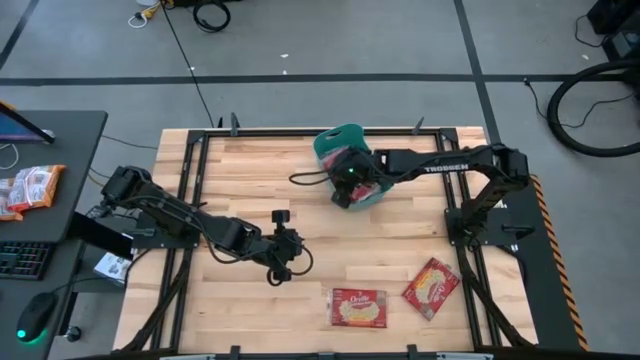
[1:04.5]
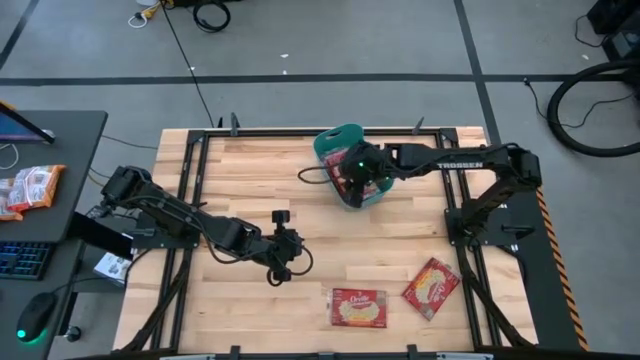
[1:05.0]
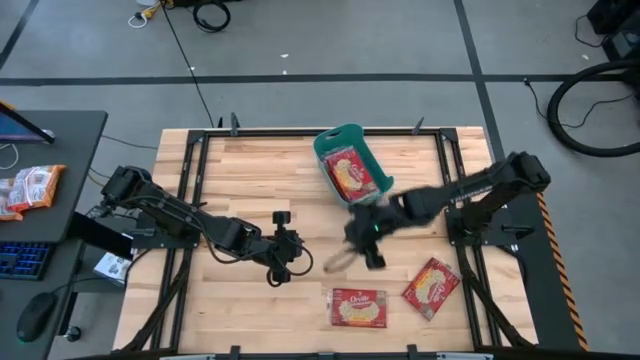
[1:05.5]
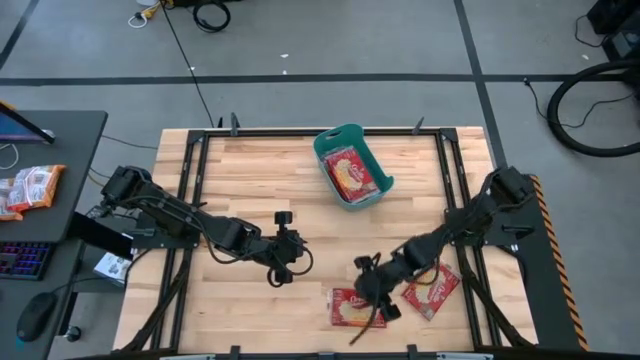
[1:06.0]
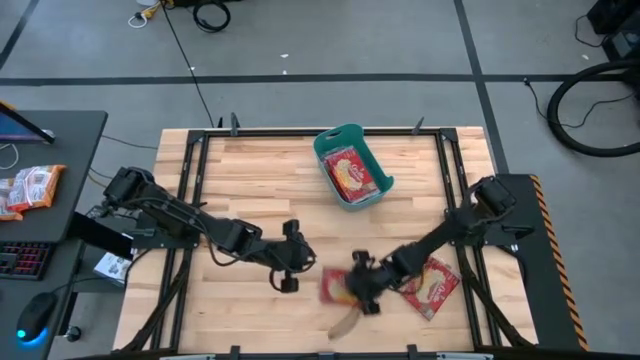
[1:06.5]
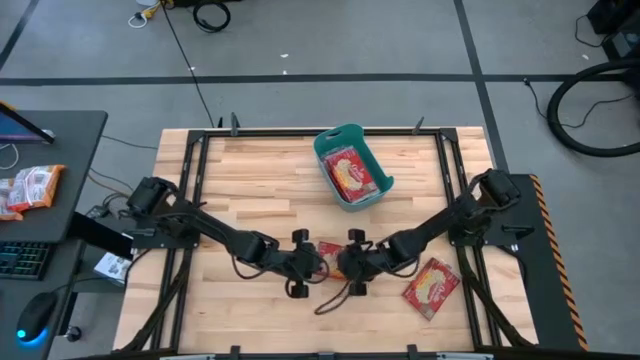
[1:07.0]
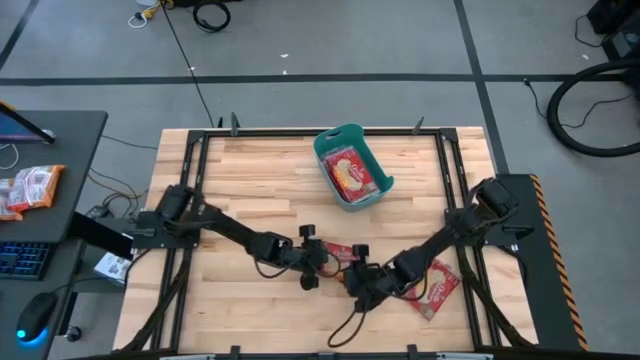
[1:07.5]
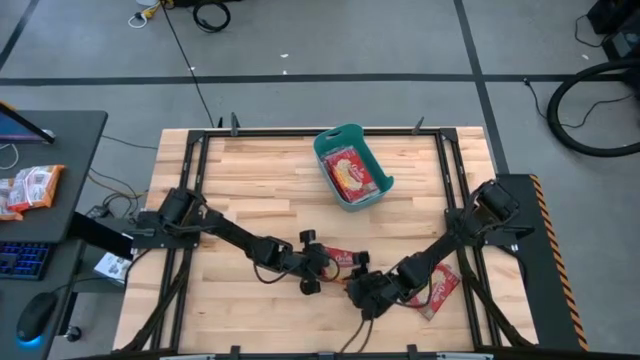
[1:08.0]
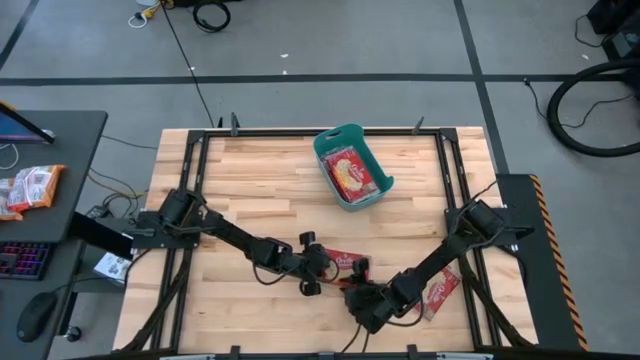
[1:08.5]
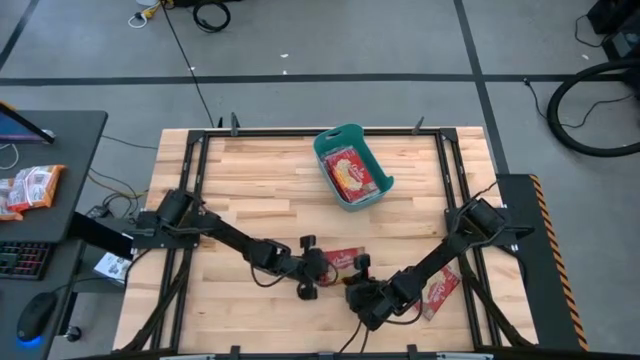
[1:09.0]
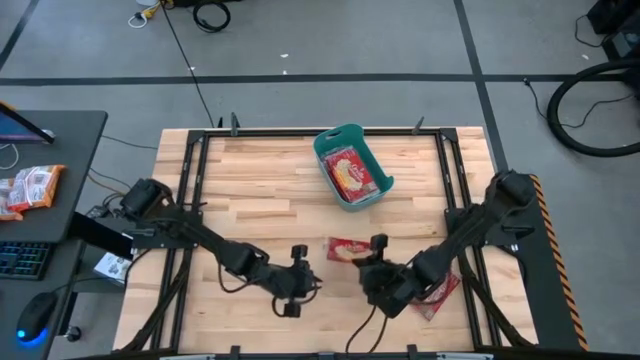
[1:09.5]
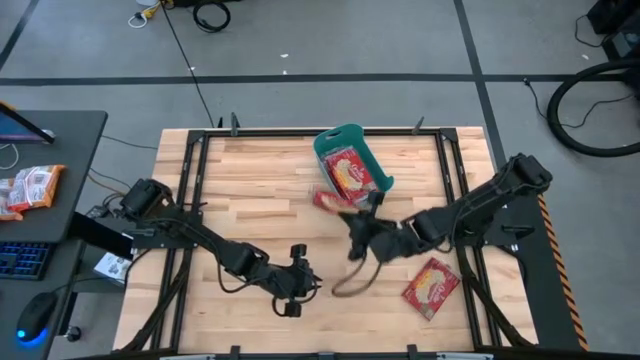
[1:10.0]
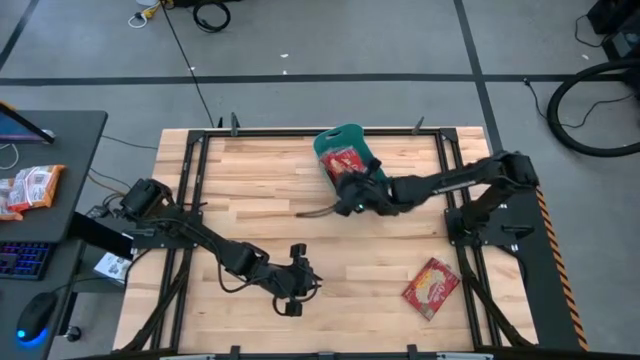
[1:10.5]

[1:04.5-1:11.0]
Task: Sort popcorn bags into baskets
Put the red popcorn bag into the green bin

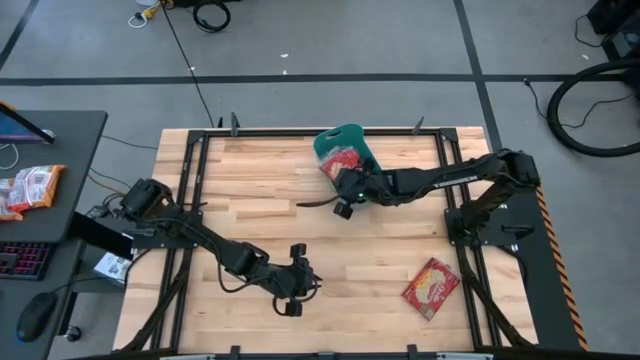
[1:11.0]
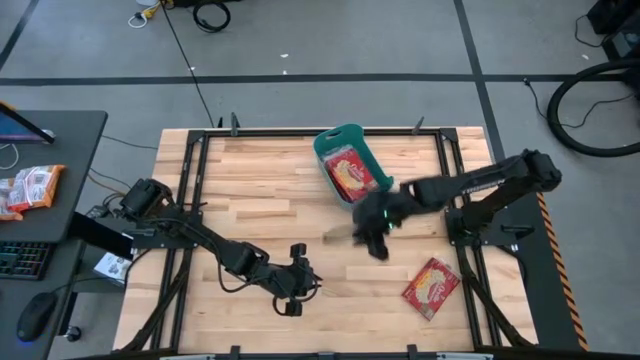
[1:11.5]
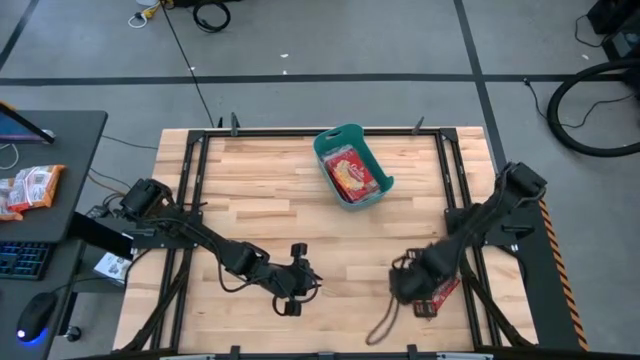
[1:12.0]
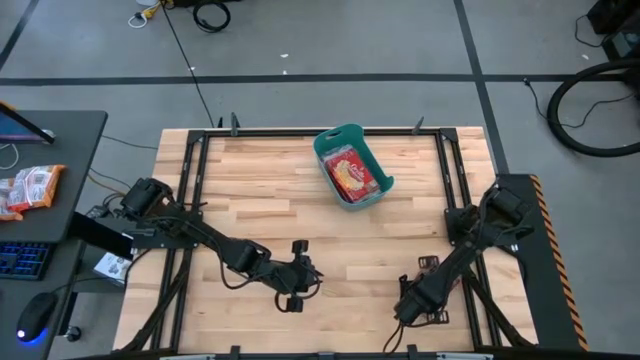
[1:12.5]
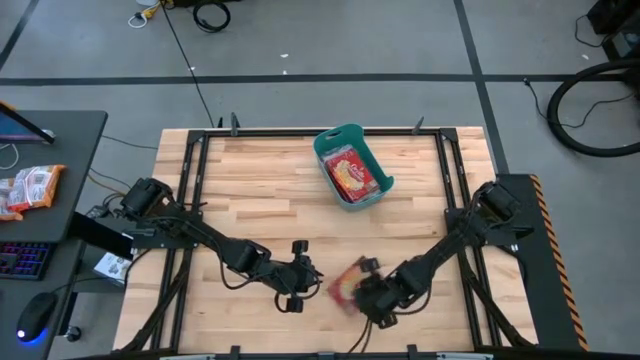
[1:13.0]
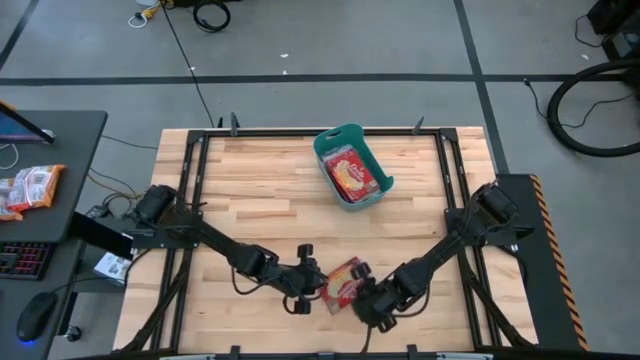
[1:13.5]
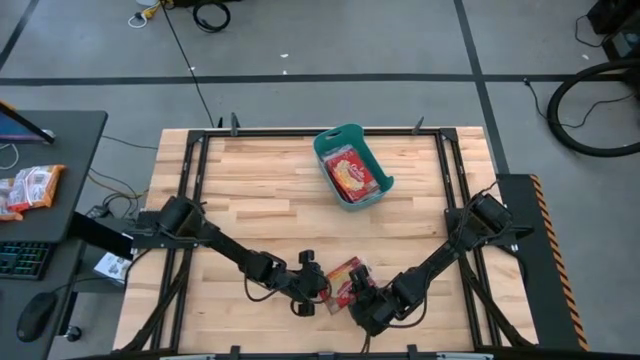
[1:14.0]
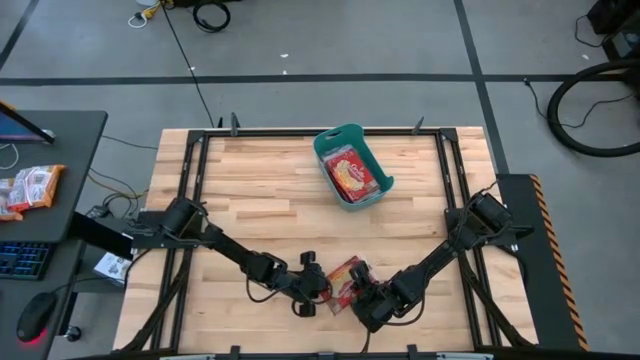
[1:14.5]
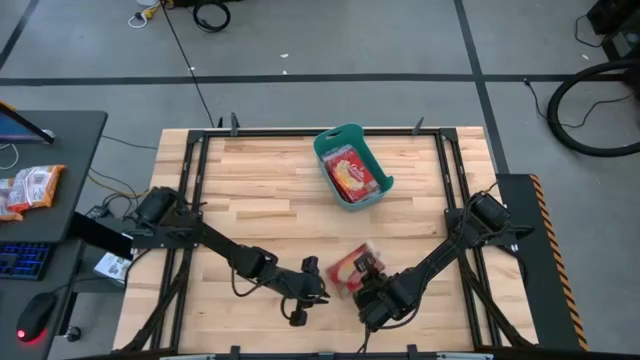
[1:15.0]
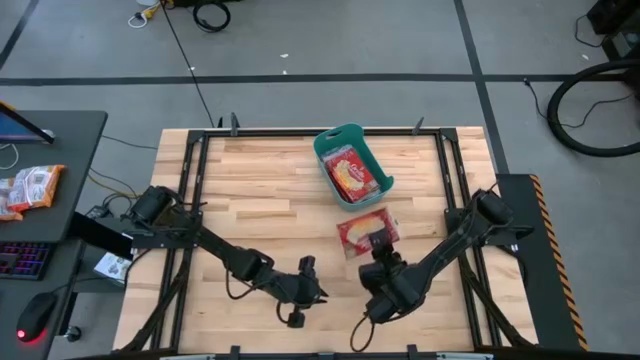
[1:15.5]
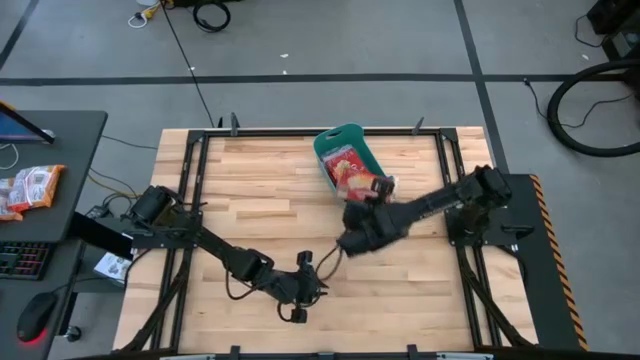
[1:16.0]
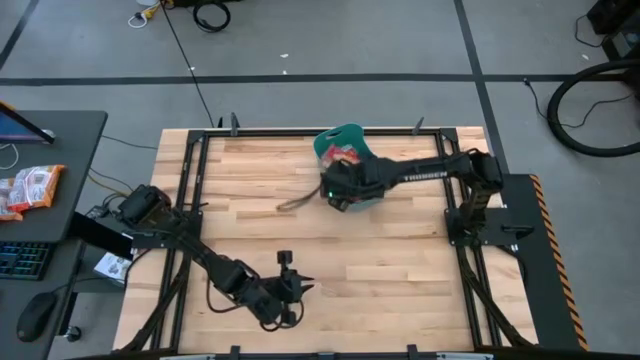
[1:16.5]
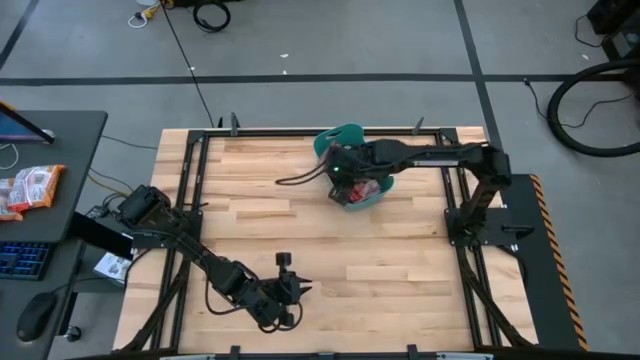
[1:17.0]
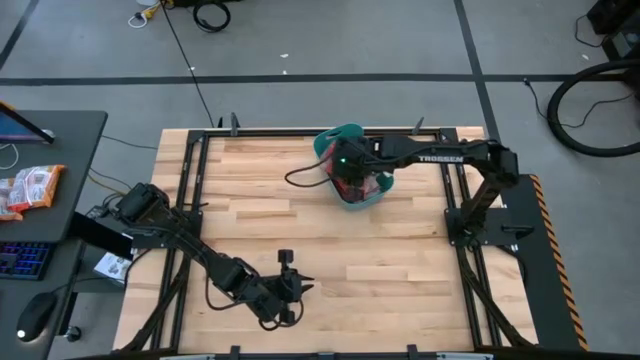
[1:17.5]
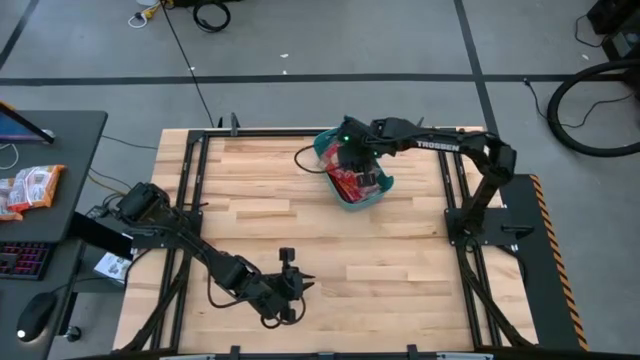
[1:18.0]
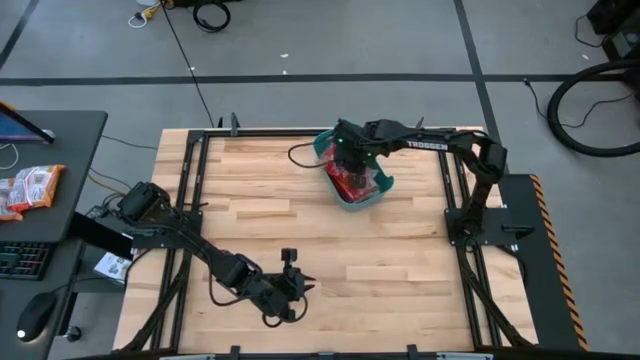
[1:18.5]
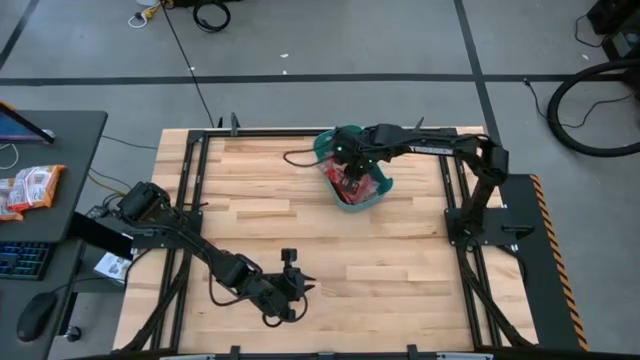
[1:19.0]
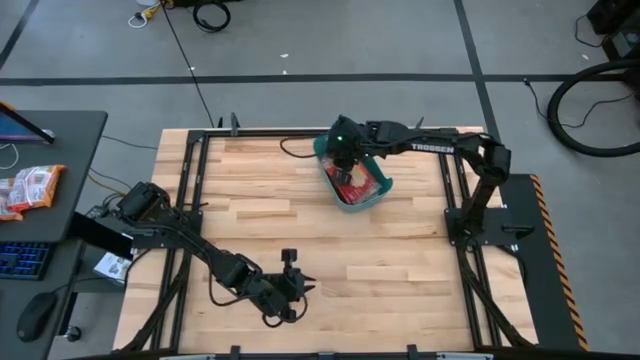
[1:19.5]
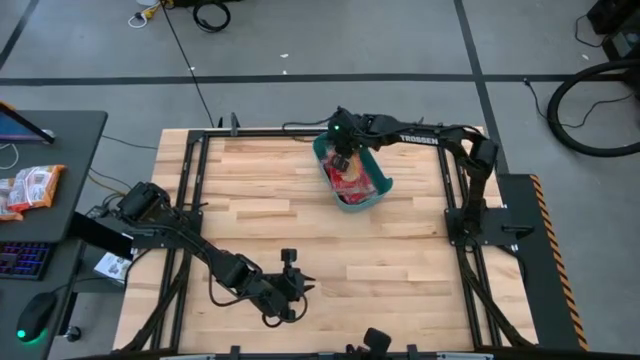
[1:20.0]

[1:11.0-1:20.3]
Put the red popcorn bag into the green bin

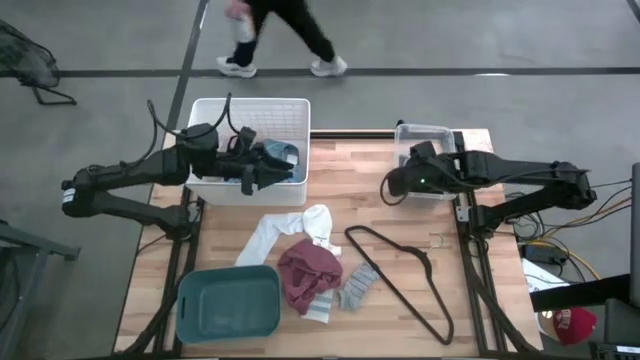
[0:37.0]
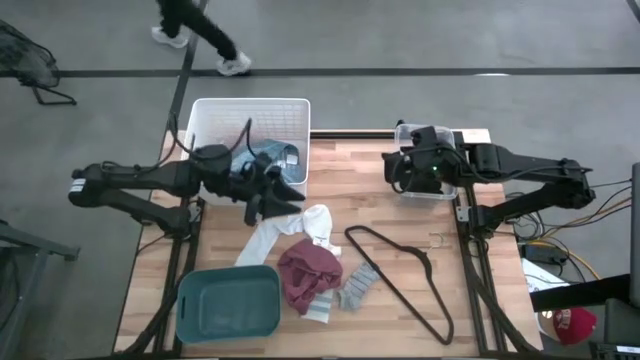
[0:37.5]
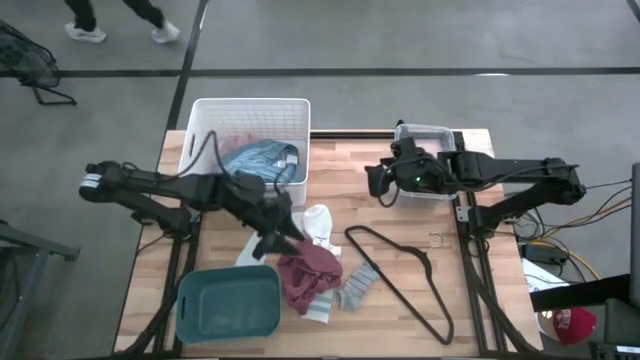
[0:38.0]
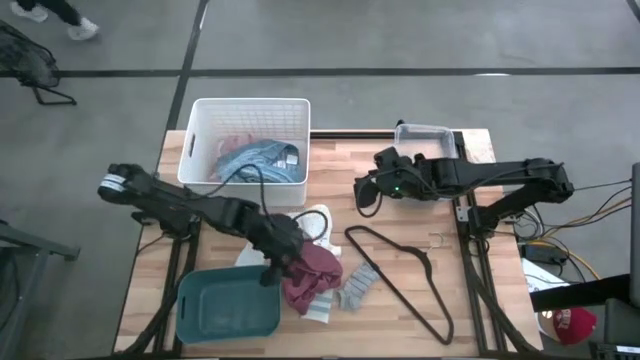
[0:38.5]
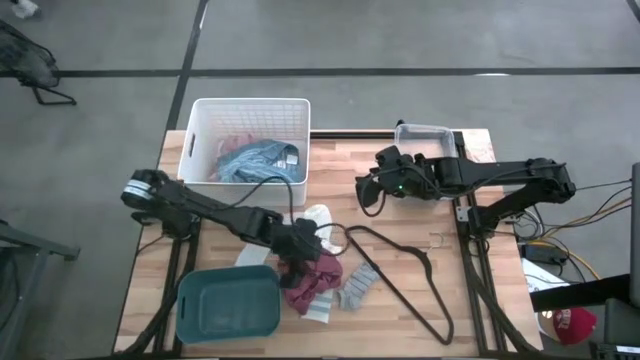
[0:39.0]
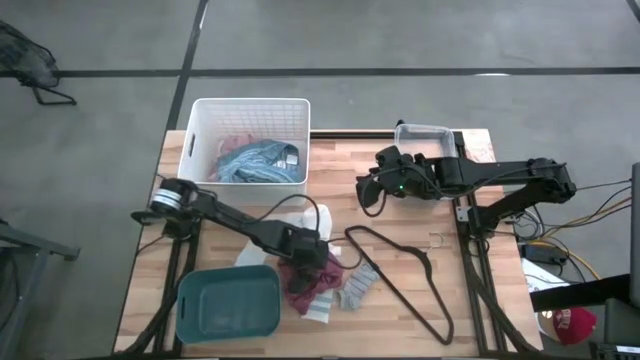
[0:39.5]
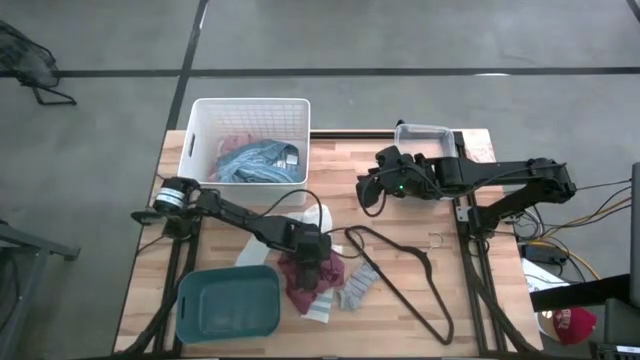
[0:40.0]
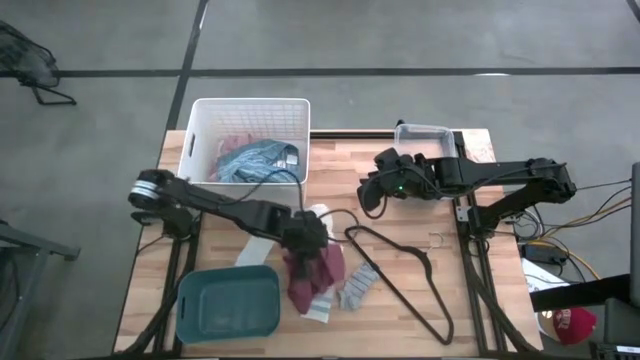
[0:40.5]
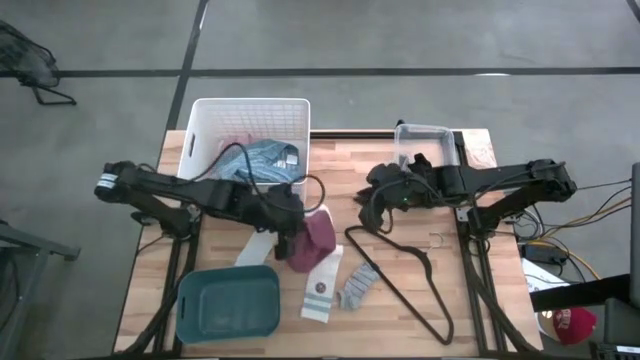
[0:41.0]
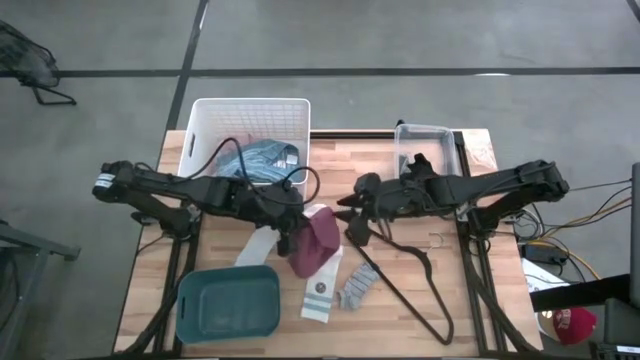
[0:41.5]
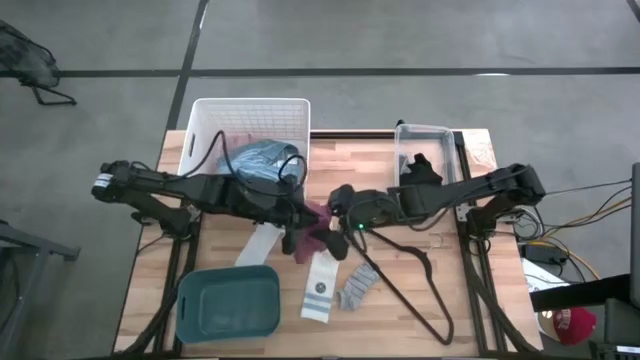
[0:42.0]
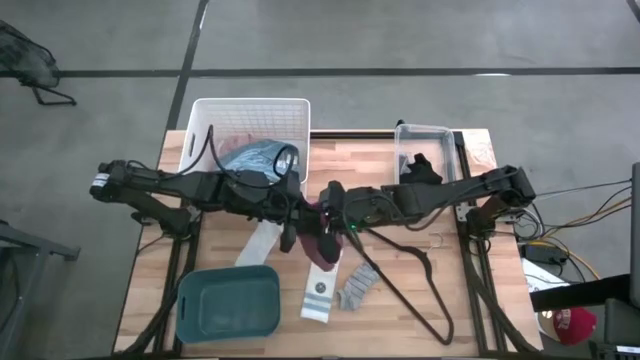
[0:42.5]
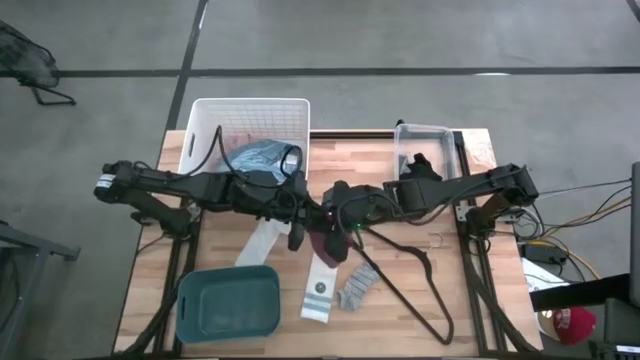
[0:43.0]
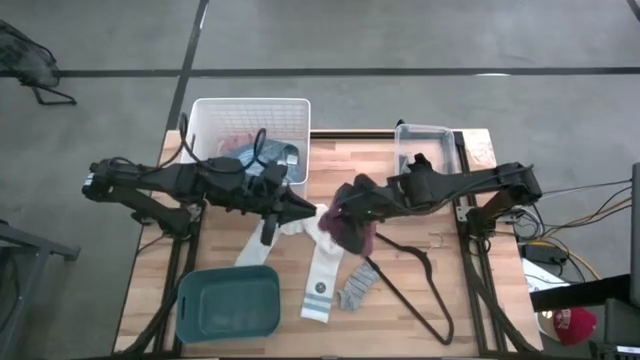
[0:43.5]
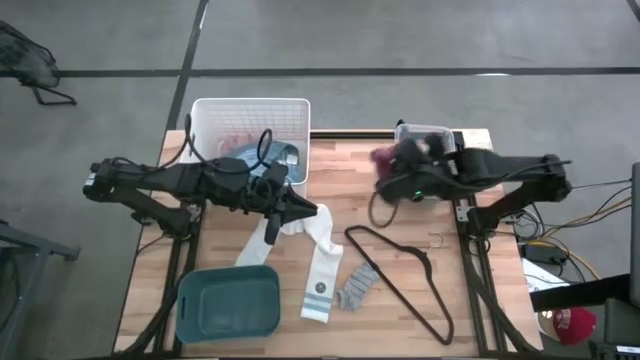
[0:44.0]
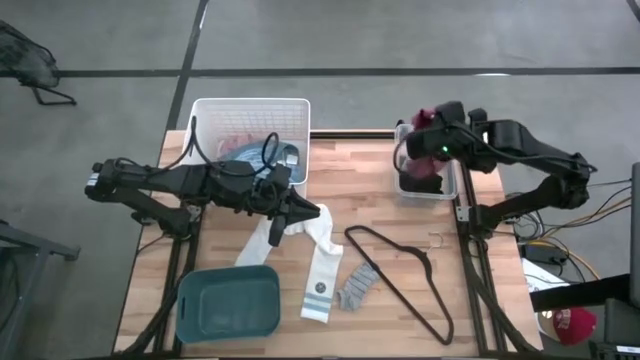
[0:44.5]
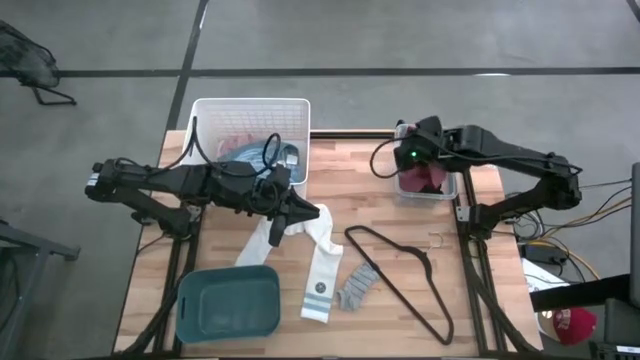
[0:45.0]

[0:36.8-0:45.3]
Task: Pick & Place Cloths
Put the red underwear into the transparent bin
